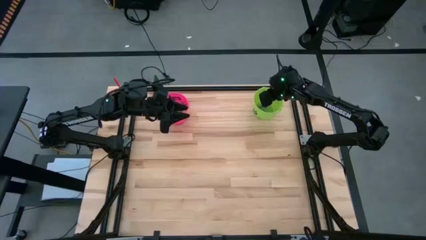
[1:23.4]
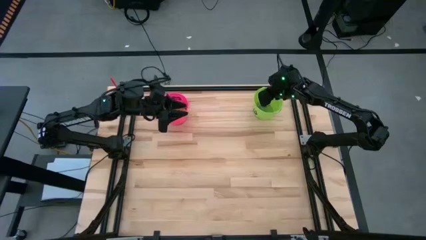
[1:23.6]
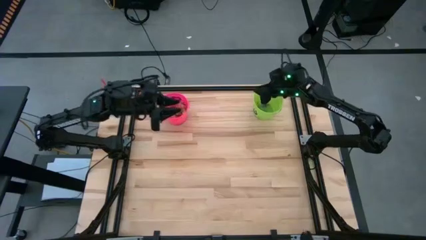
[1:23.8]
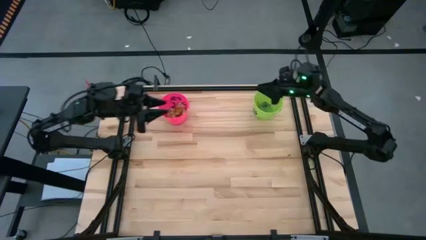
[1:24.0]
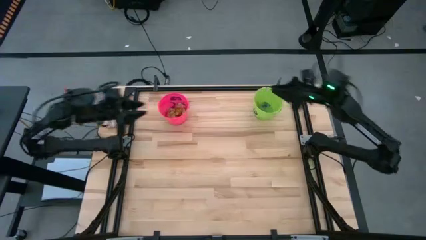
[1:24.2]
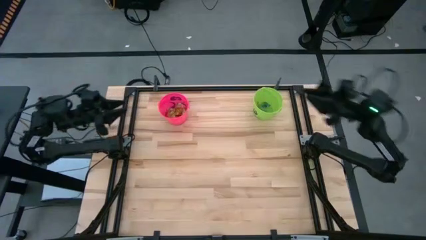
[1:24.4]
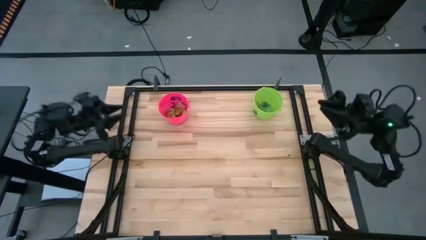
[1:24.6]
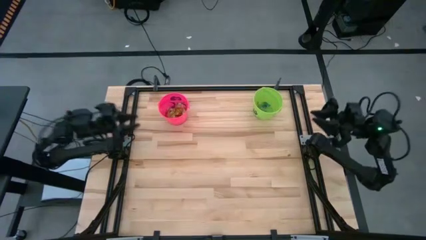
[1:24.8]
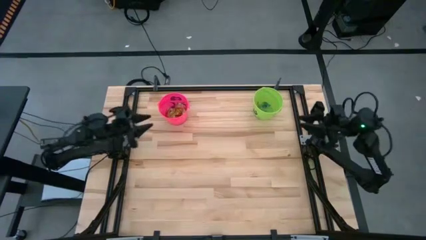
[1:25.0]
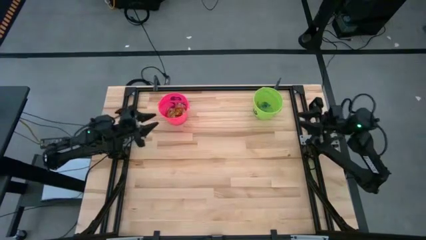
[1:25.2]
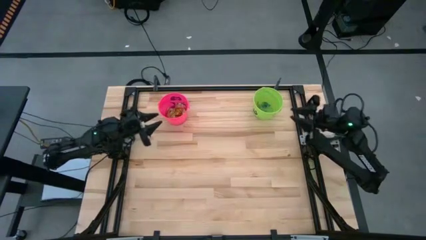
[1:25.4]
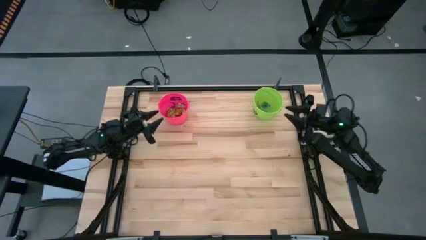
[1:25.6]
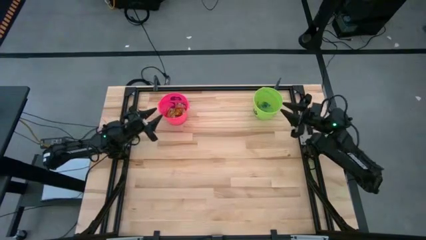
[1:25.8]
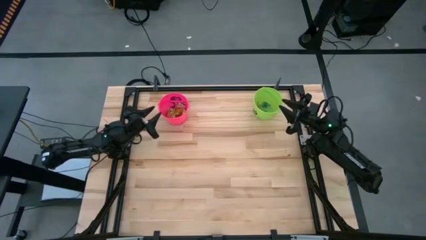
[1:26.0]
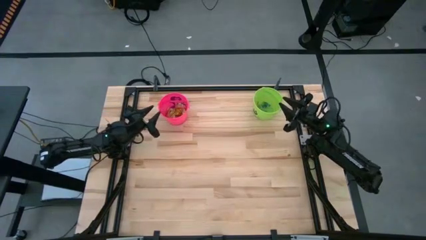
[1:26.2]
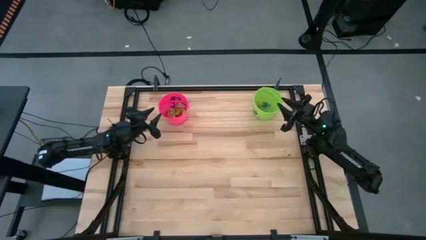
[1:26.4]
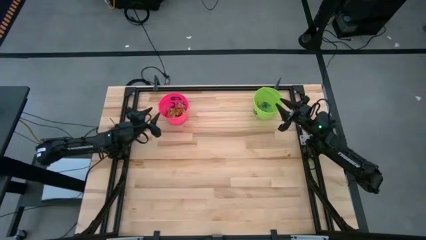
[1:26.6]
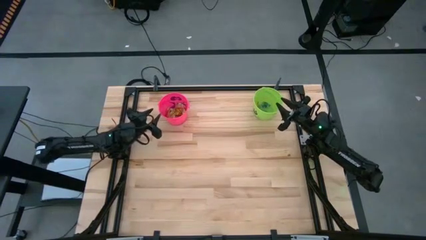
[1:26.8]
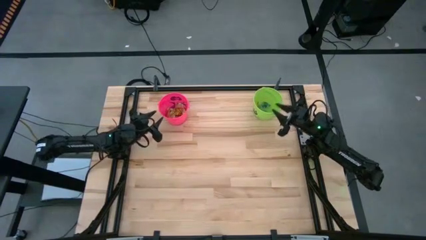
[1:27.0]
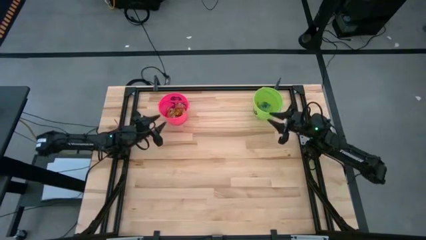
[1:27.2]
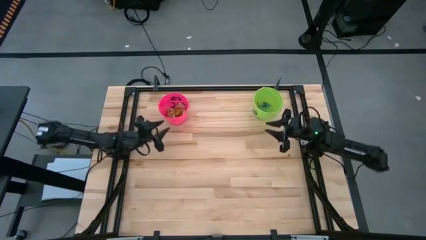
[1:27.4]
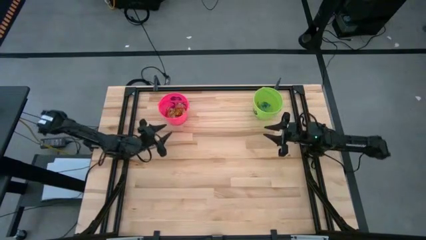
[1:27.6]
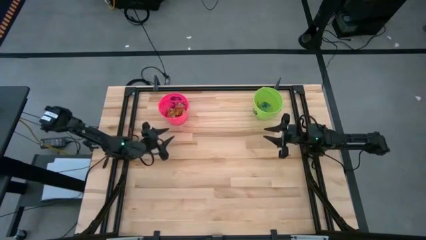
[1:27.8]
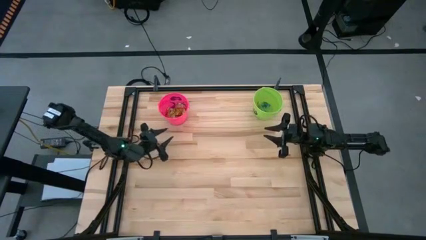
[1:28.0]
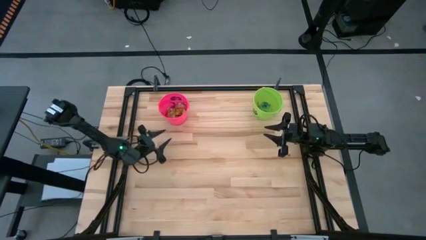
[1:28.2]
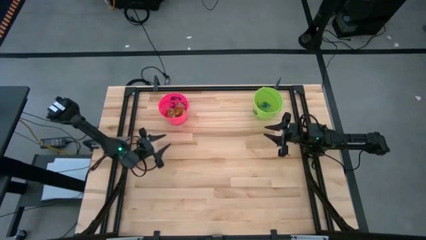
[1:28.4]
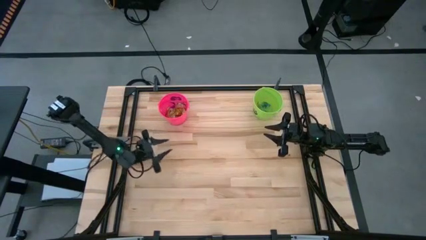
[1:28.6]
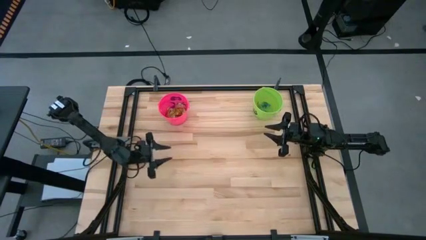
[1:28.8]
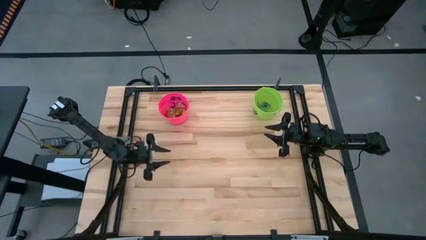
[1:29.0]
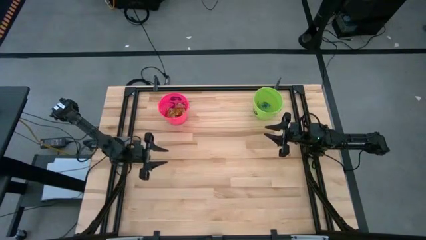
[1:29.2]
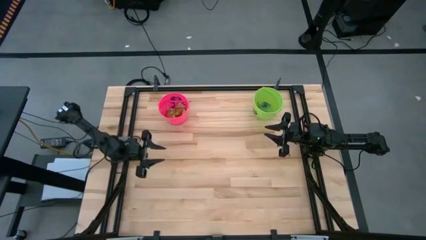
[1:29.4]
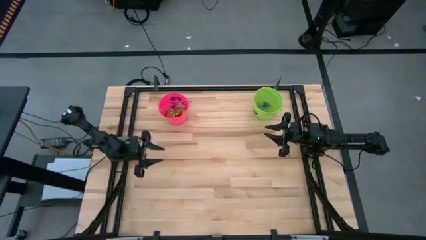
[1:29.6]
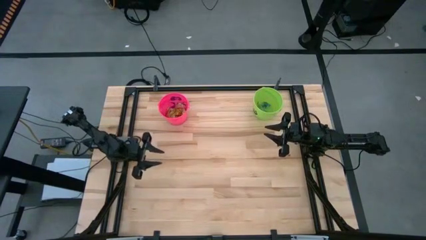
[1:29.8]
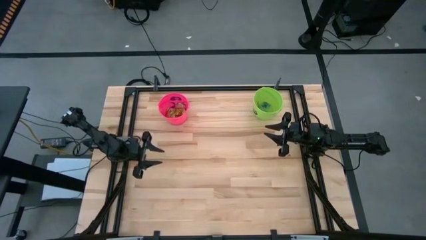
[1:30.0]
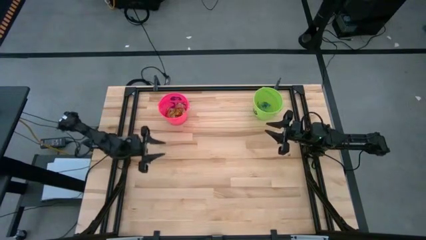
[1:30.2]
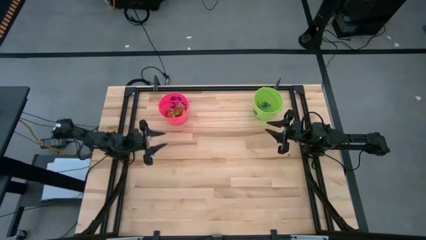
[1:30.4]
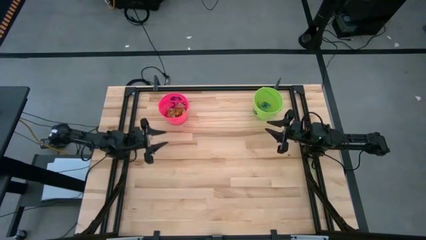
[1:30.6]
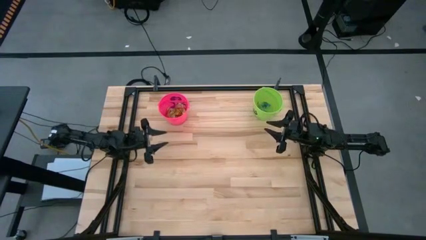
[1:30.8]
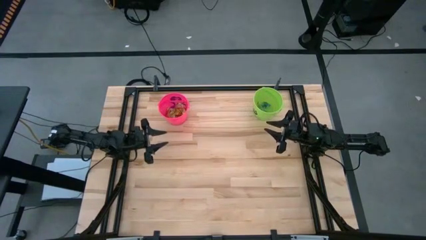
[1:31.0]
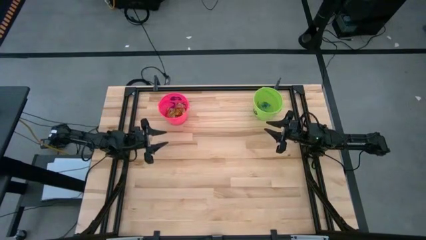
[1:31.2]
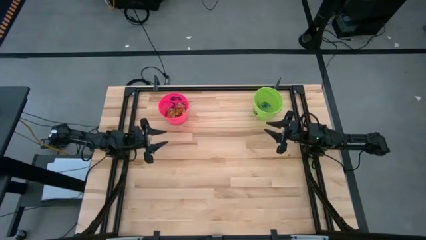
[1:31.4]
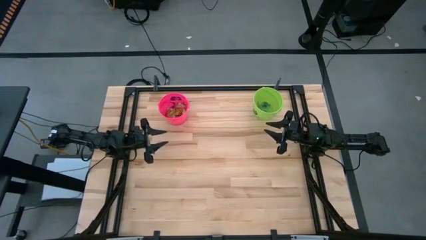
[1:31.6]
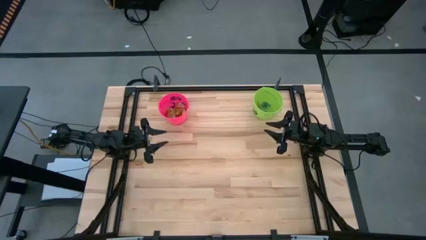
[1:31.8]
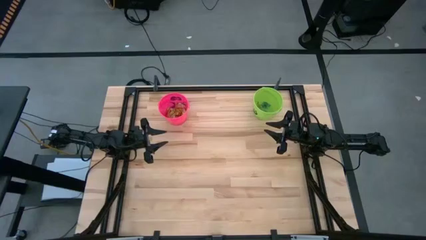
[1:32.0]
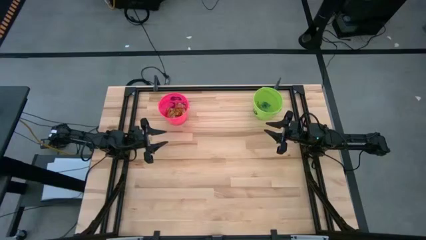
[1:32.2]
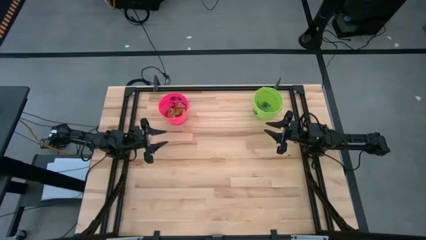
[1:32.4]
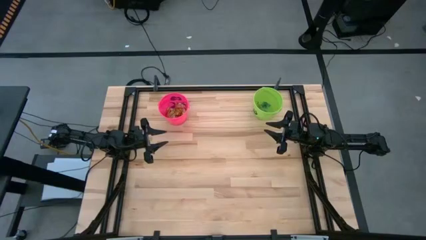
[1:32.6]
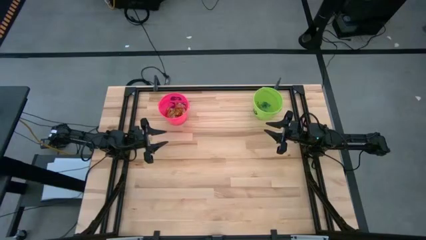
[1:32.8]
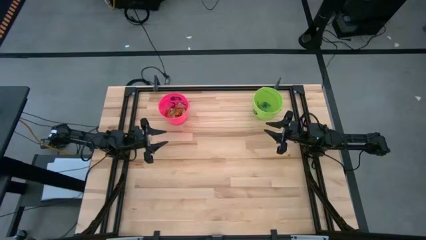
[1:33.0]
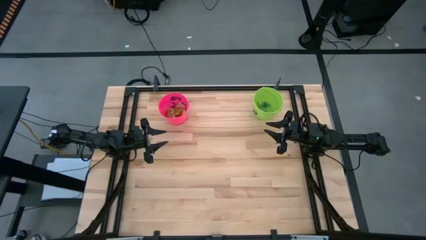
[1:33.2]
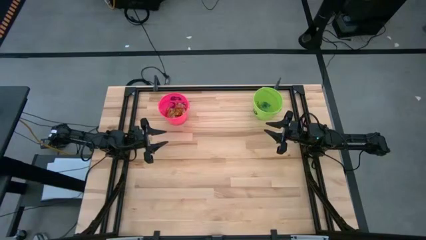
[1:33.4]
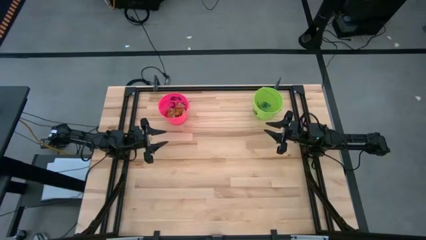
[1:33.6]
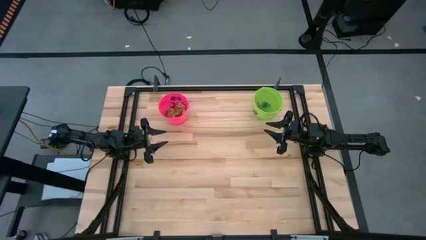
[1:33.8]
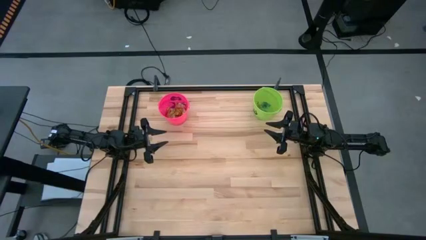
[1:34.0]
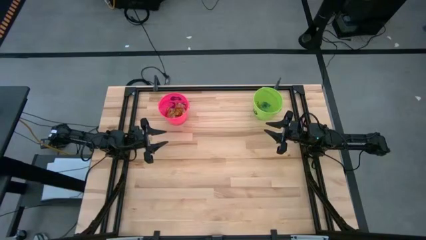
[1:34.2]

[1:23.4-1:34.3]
Task: Sort candy by brand, put in halloween buckets
Return to Home Position
